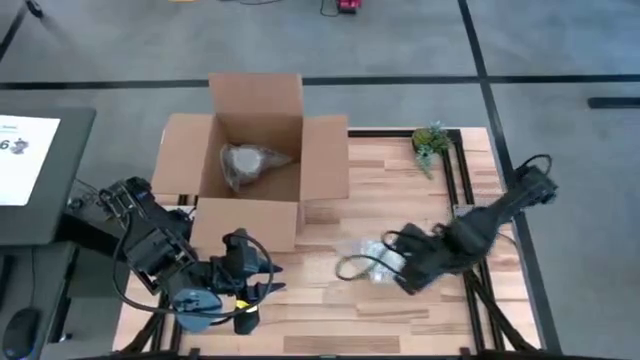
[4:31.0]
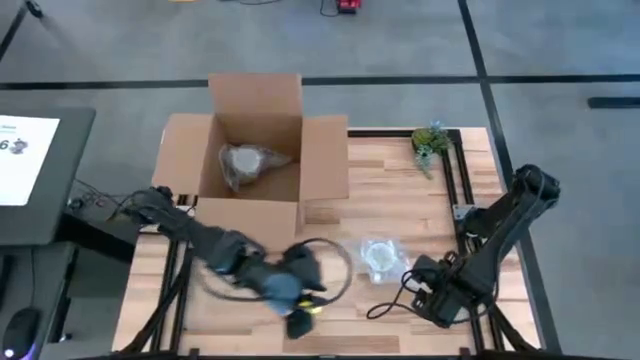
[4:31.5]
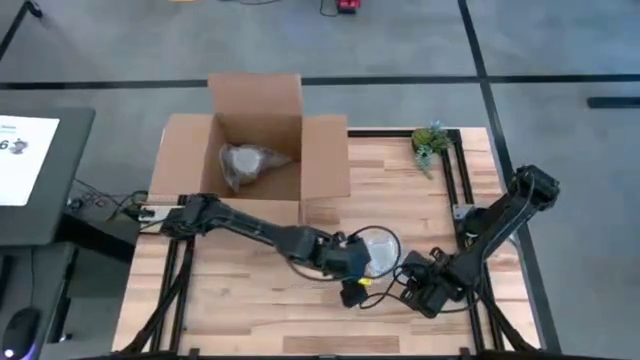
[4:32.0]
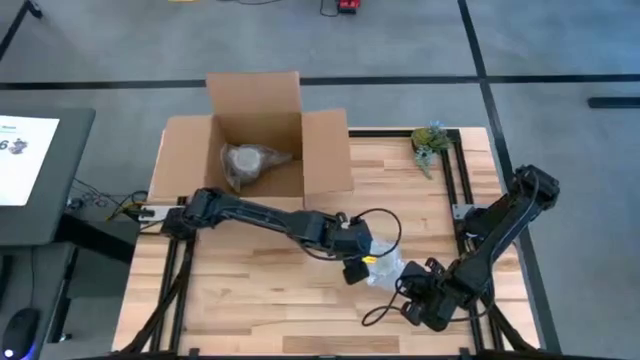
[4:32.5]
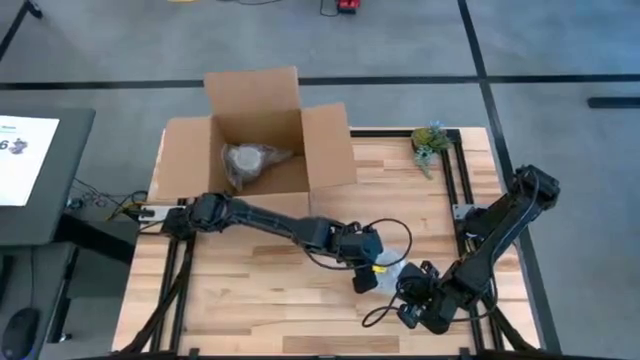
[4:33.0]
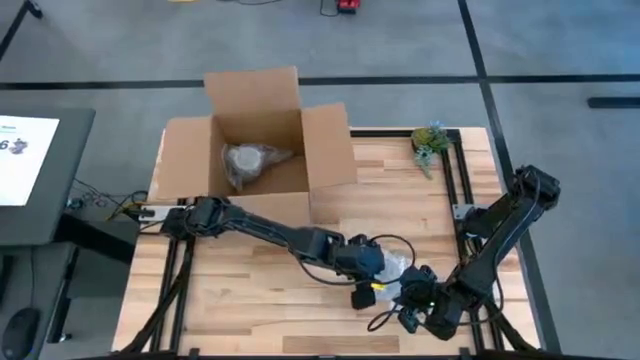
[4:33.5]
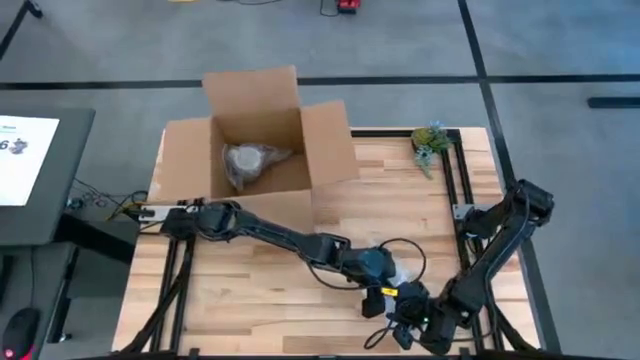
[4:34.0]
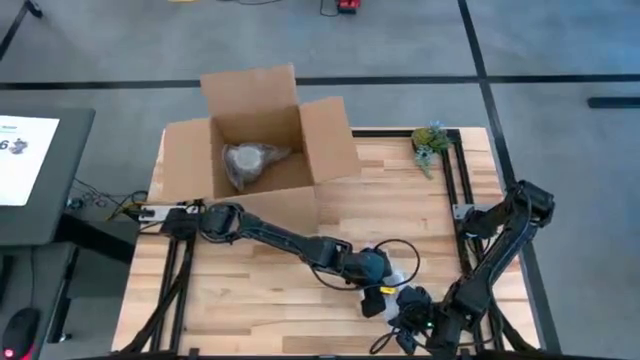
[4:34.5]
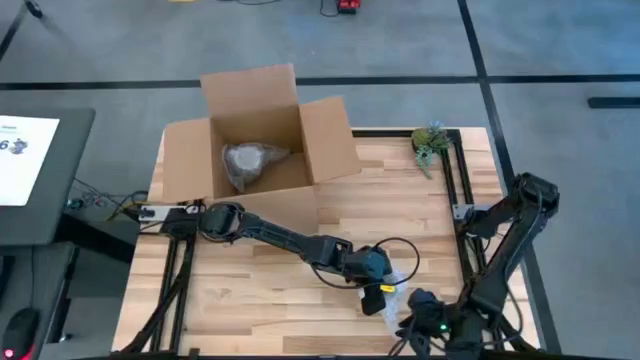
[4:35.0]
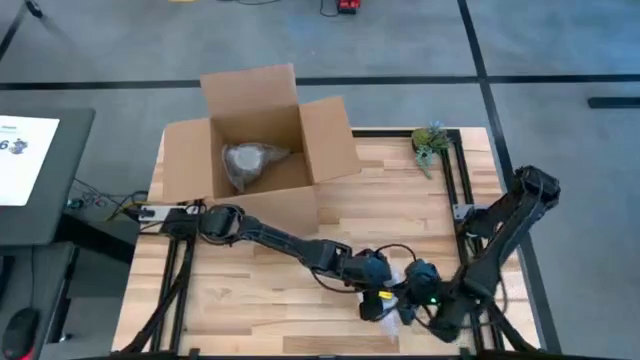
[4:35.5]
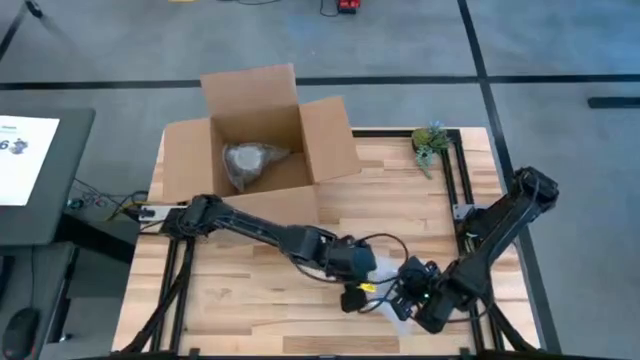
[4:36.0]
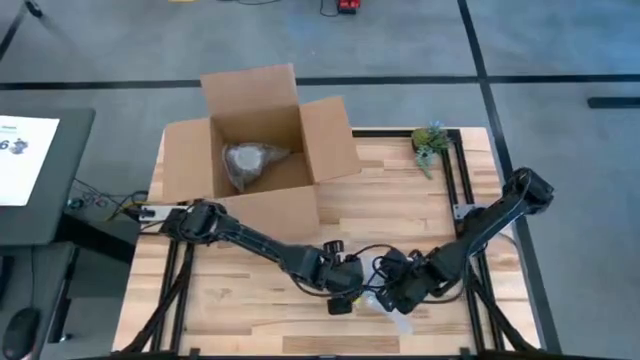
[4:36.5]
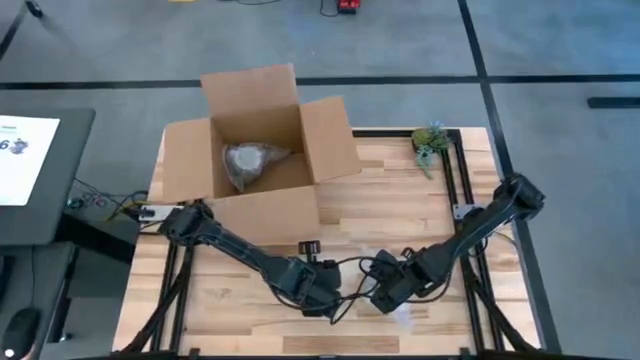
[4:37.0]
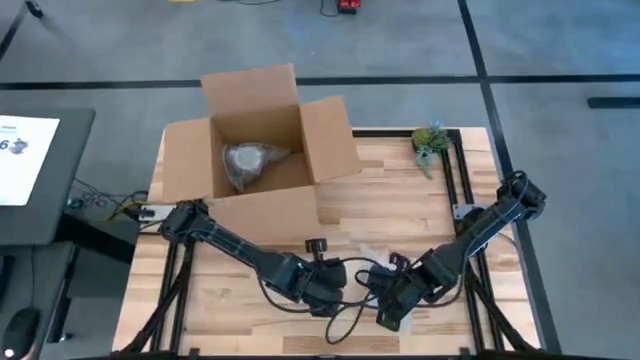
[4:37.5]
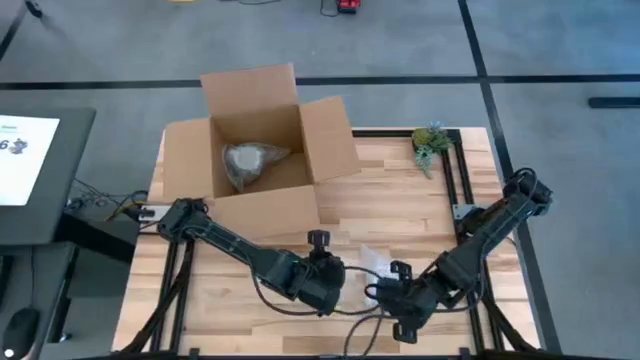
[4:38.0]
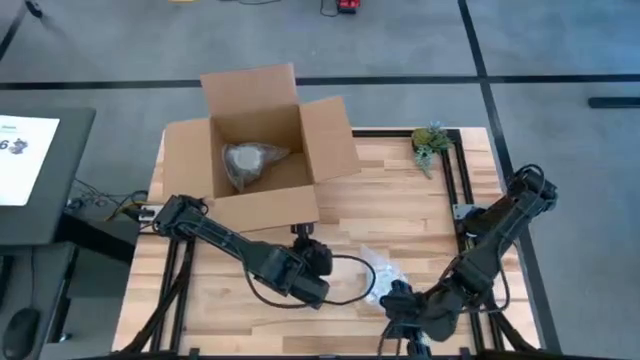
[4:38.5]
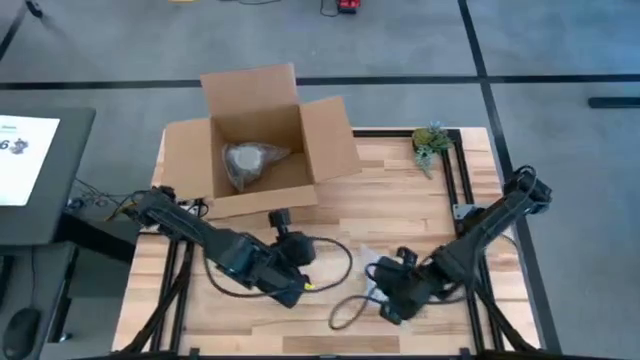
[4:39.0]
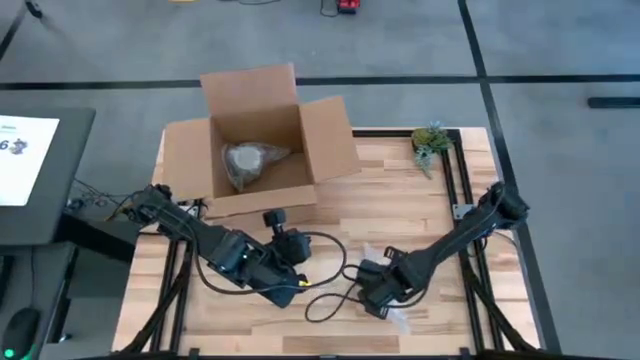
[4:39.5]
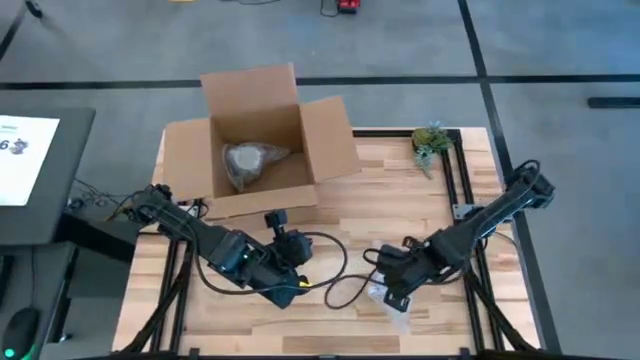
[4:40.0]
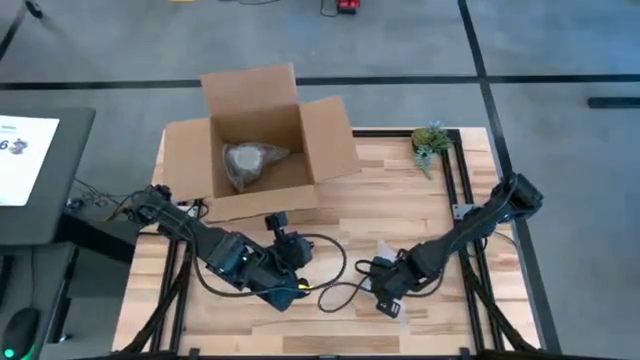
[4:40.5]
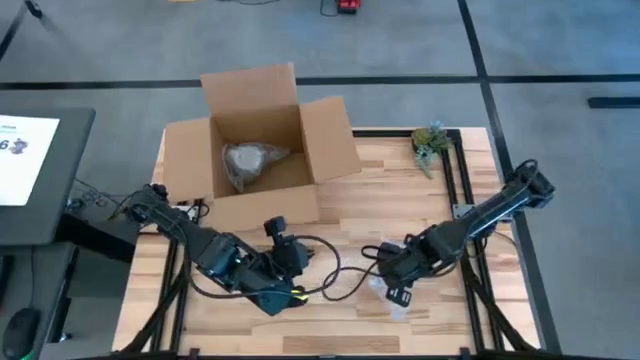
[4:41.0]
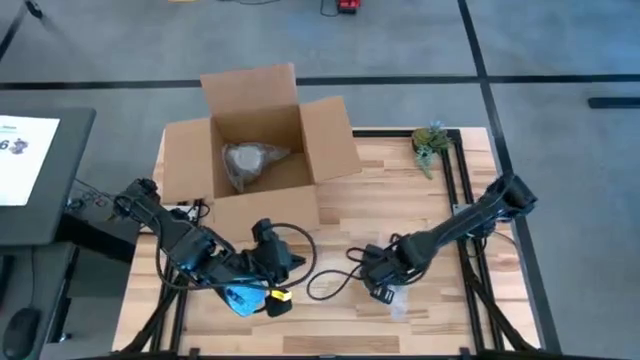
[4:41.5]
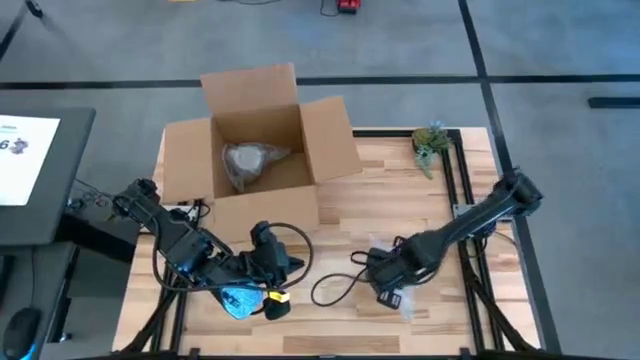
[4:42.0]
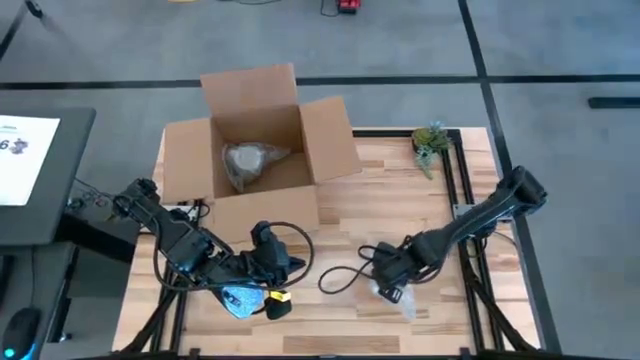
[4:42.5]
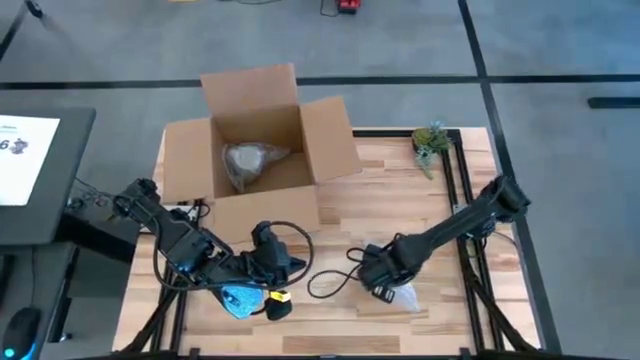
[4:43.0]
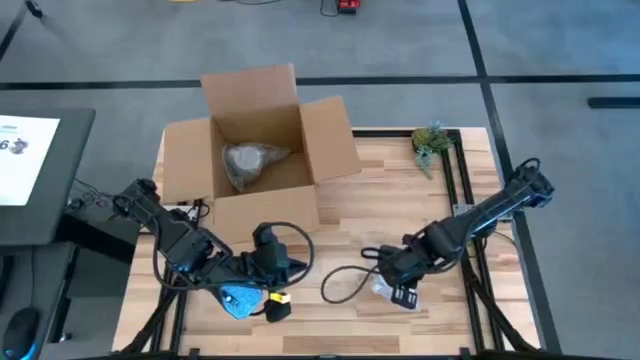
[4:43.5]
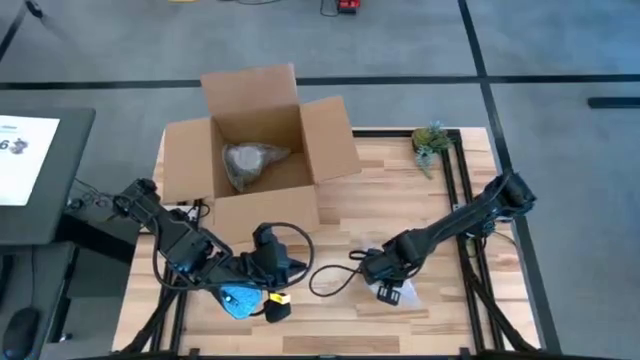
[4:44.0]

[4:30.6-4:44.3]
Task: wrap mug
Wrap the blue patterned mug with the bubble wrap

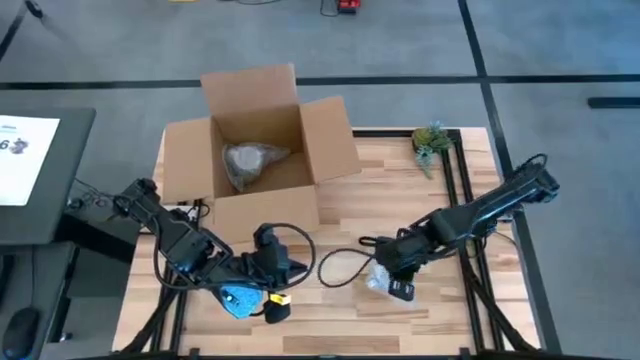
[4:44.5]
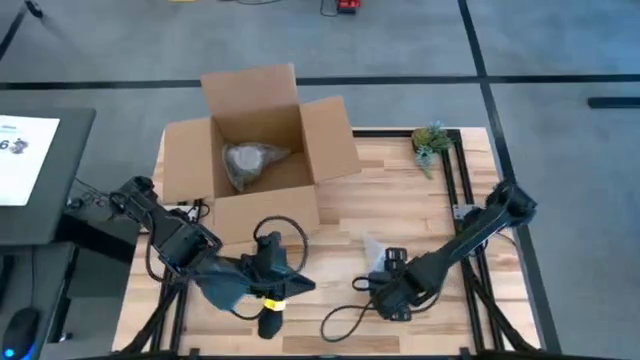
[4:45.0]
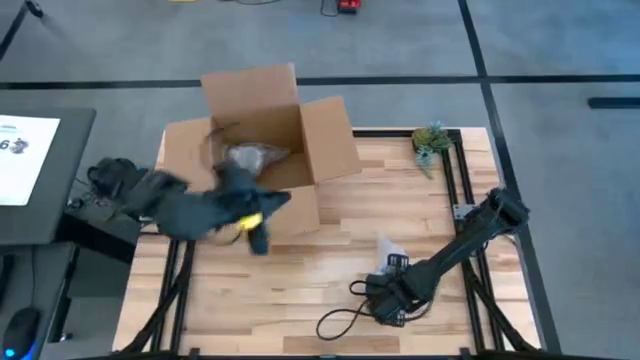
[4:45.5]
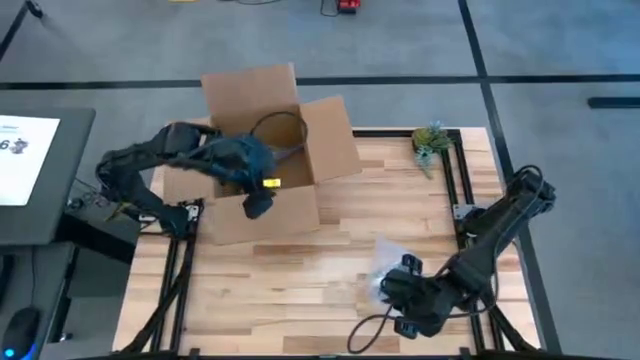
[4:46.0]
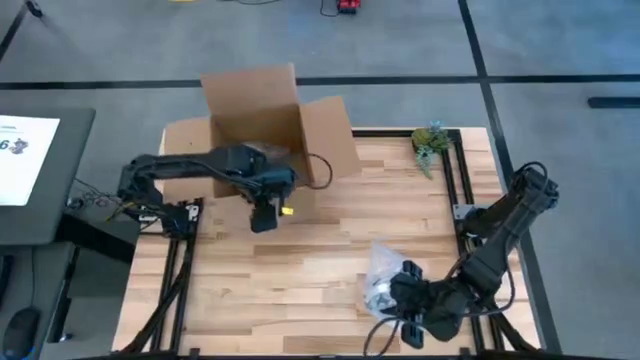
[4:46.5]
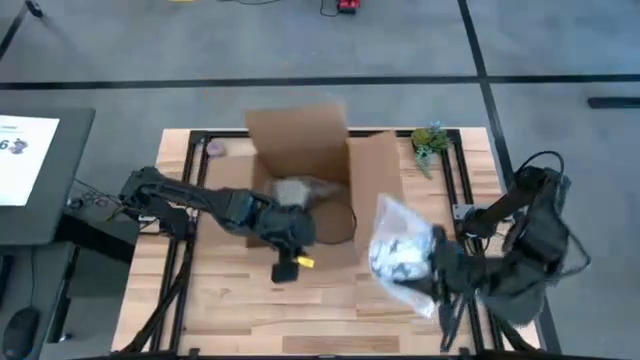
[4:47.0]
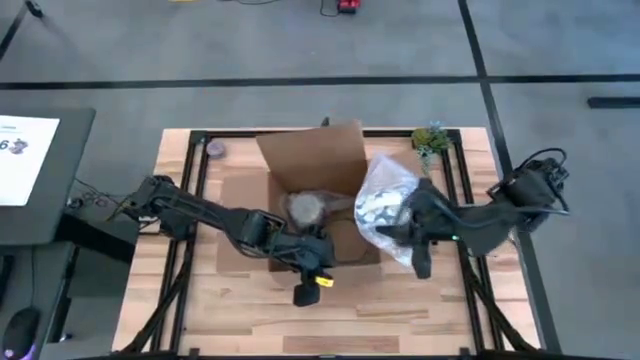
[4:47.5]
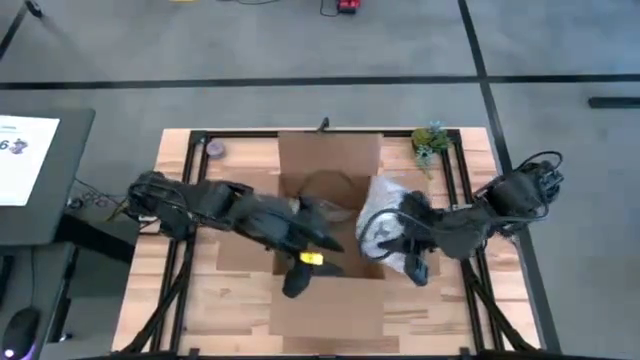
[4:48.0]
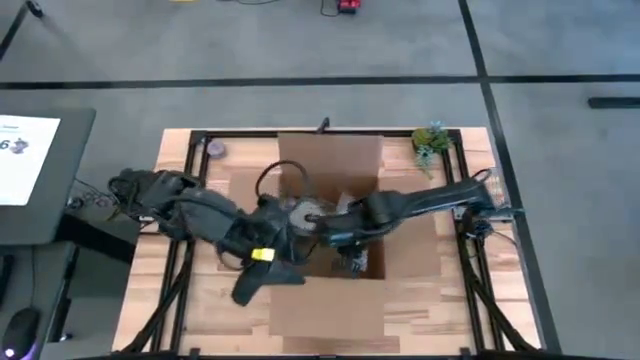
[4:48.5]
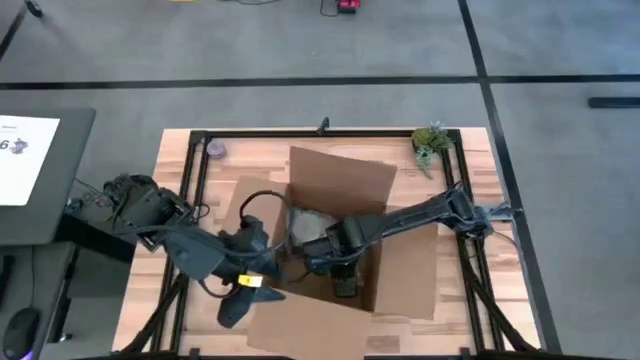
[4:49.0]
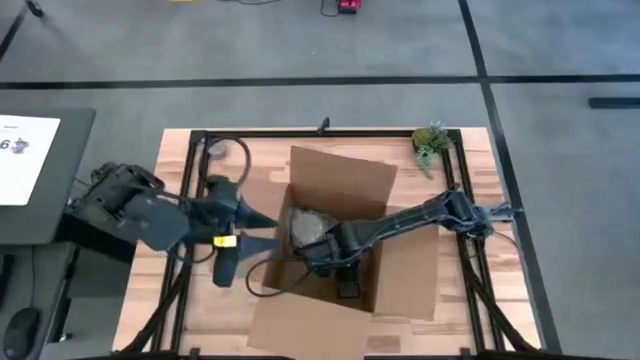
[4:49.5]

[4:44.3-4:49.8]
Put the wrapped blue patterned mug into the box

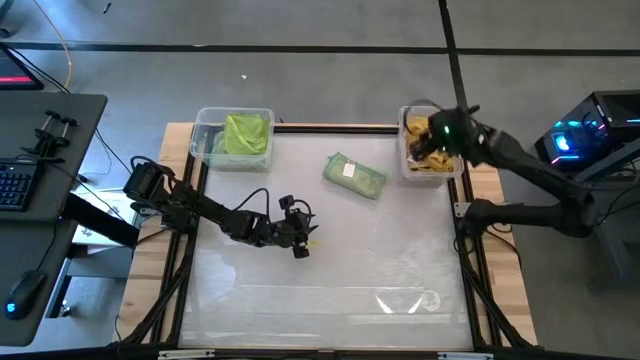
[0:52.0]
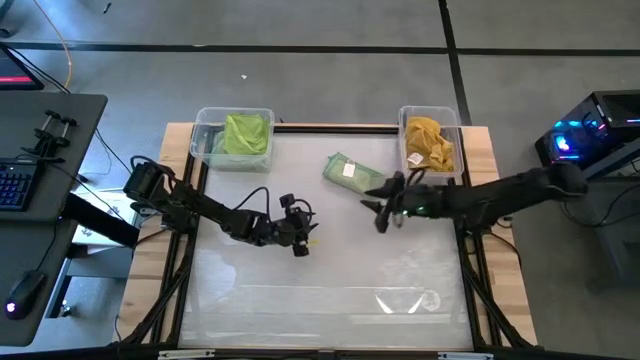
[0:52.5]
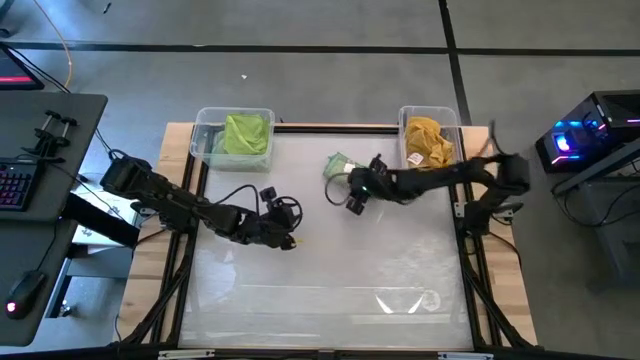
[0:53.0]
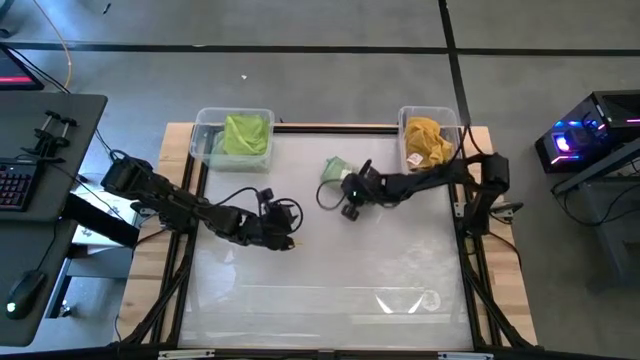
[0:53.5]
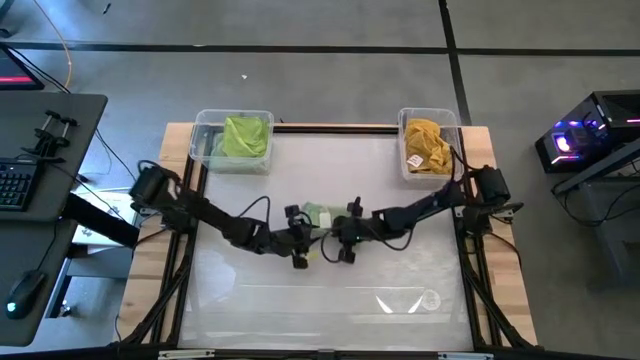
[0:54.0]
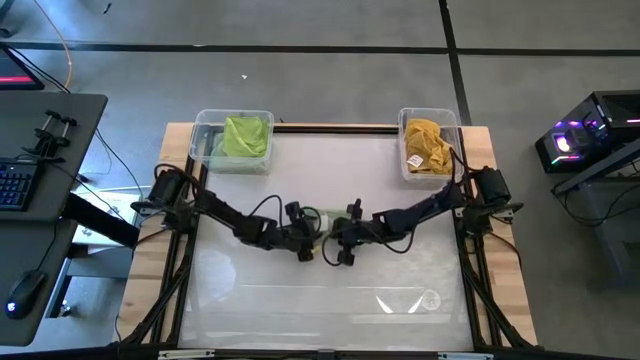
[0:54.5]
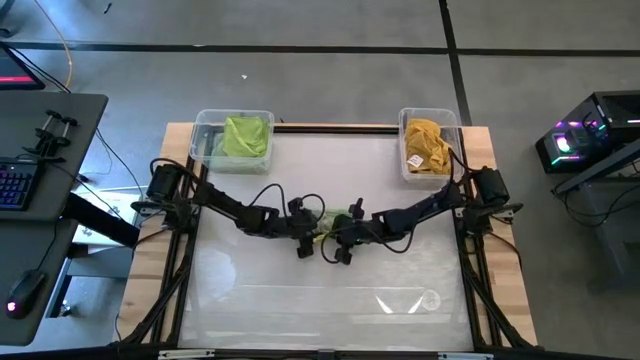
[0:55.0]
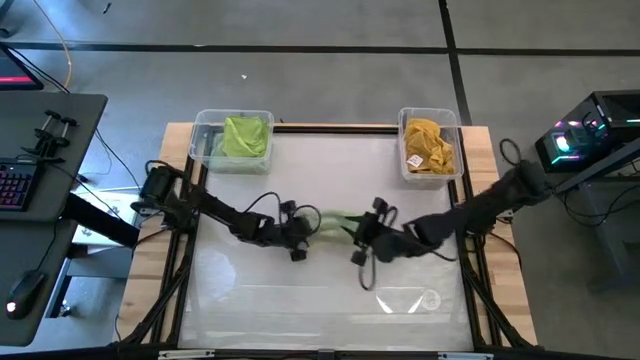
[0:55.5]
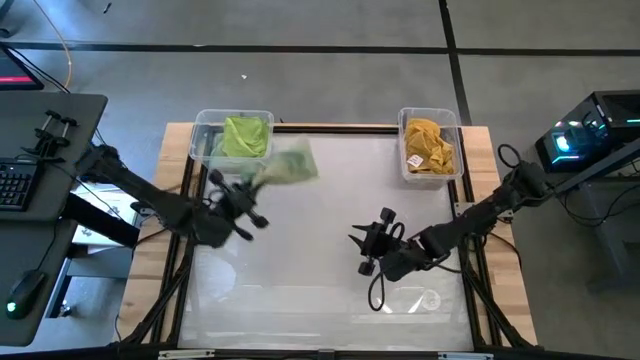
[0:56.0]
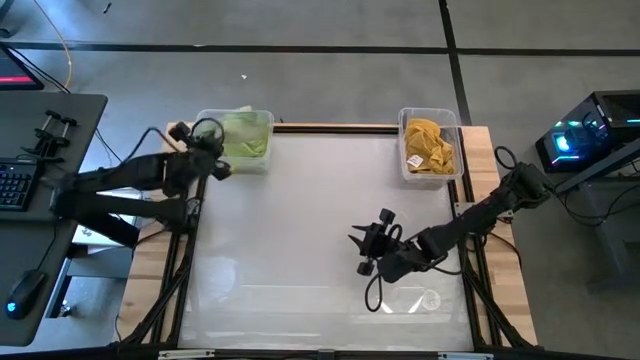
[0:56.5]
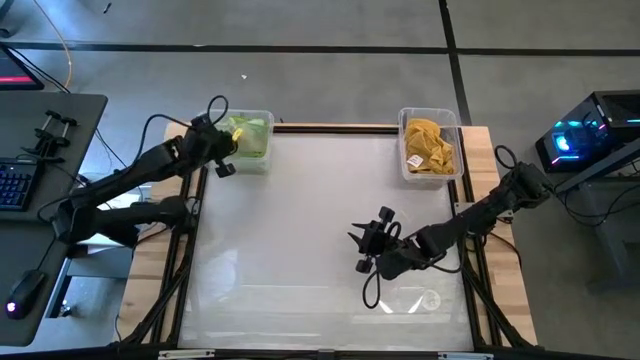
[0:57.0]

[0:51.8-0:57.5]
Task: Sort towels by color in basket
Put the green microfiber towel into the left transparent bin
